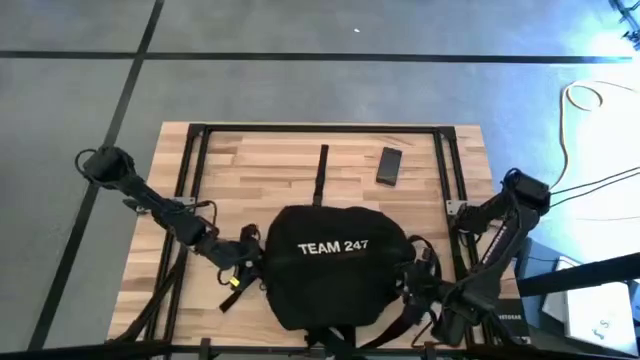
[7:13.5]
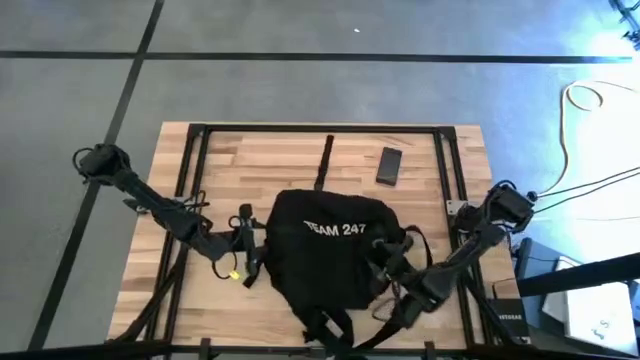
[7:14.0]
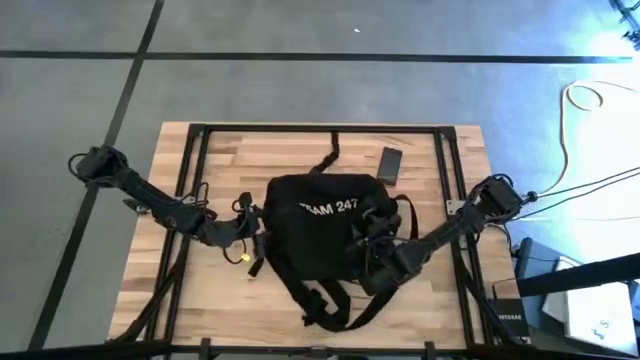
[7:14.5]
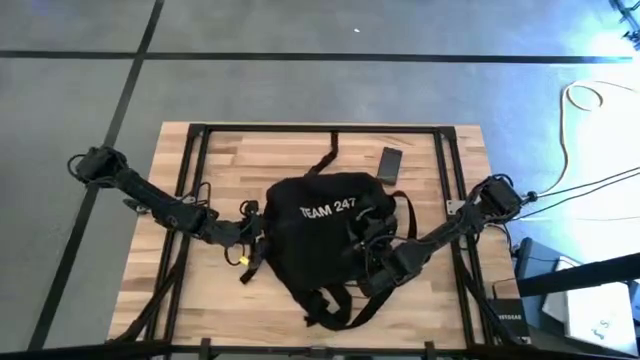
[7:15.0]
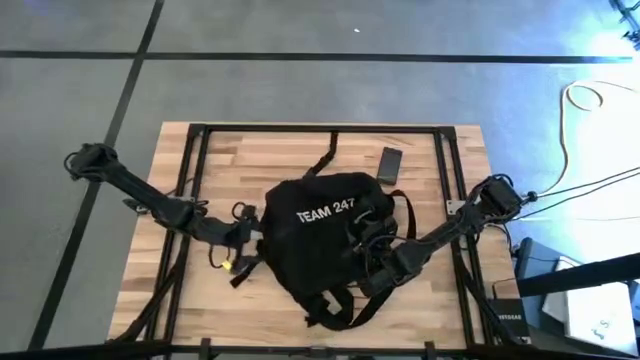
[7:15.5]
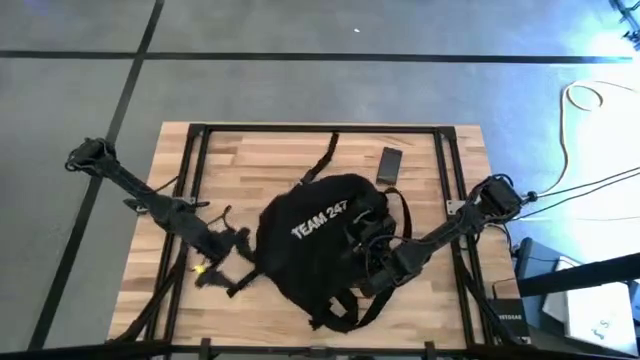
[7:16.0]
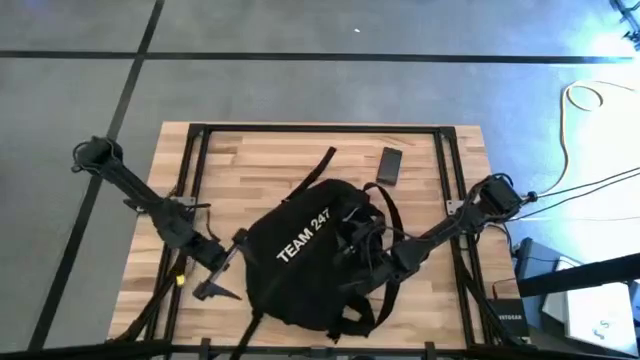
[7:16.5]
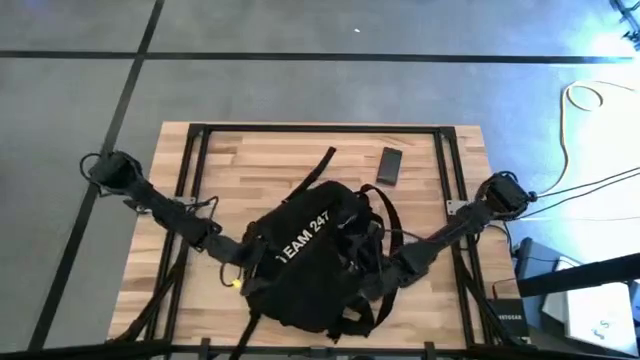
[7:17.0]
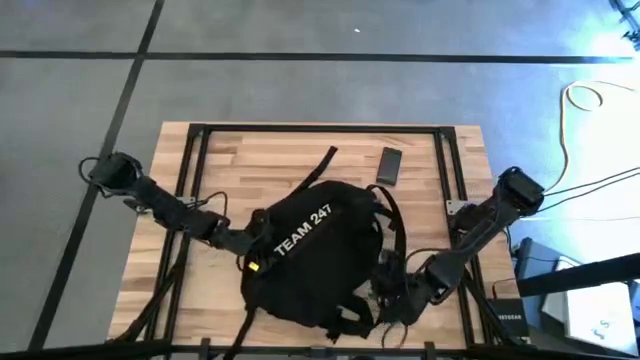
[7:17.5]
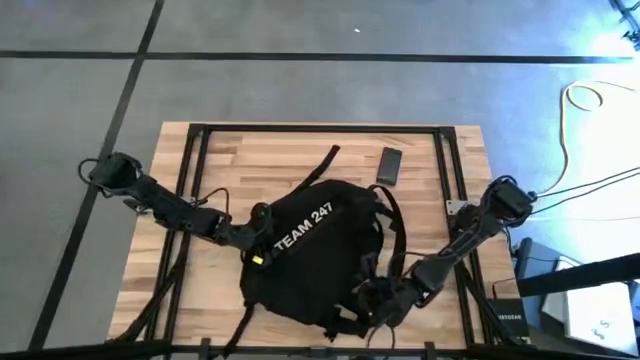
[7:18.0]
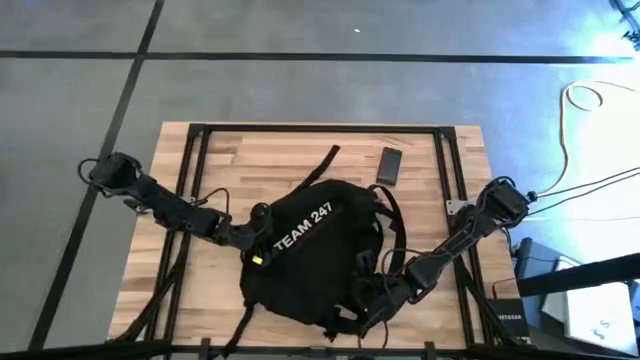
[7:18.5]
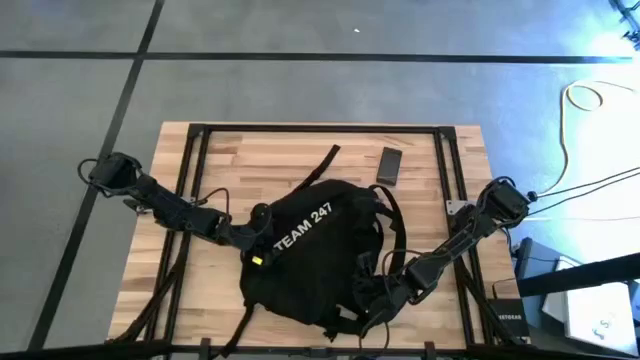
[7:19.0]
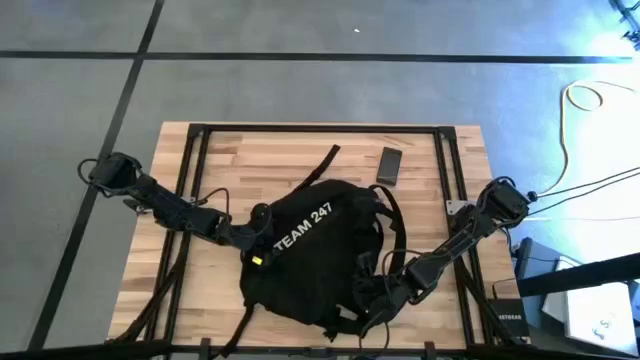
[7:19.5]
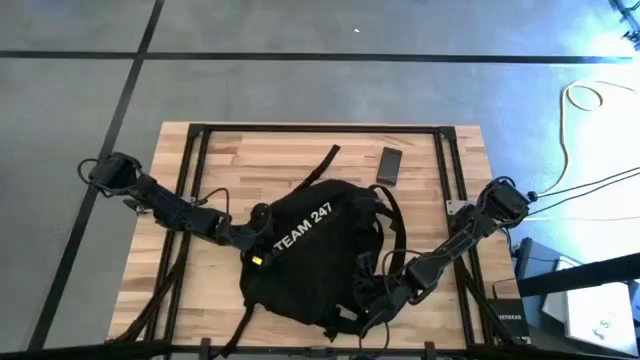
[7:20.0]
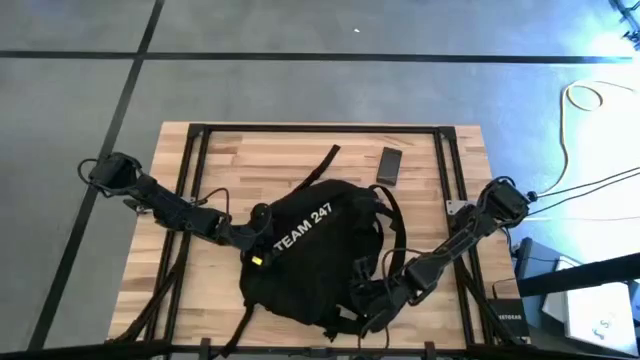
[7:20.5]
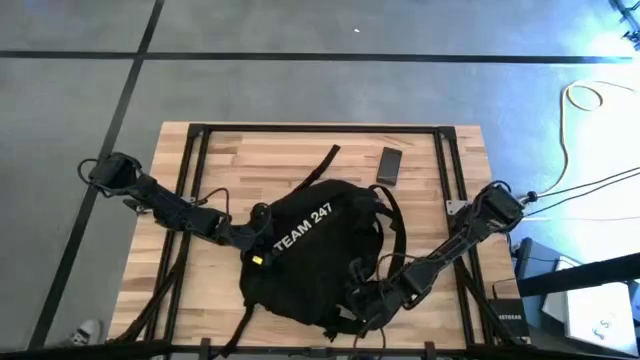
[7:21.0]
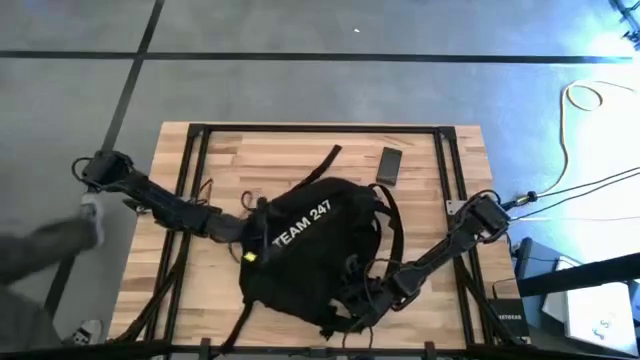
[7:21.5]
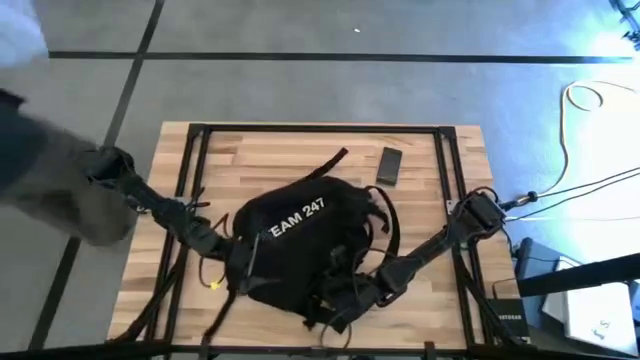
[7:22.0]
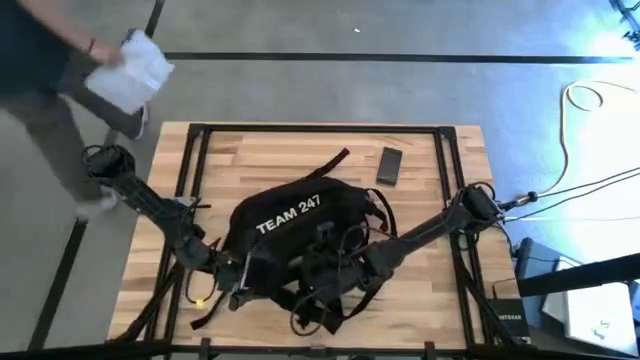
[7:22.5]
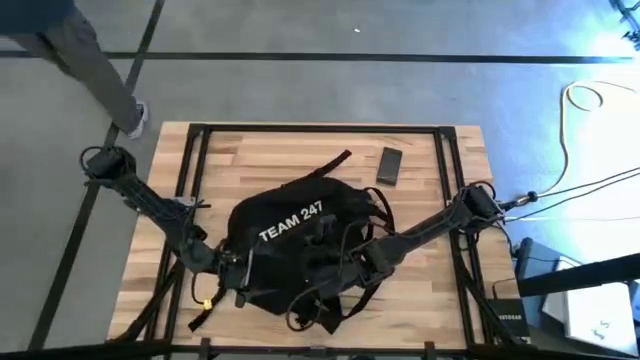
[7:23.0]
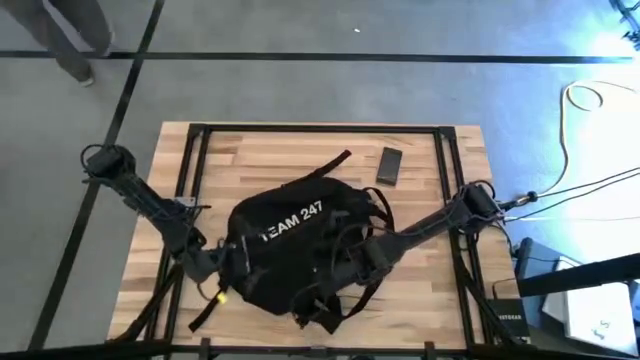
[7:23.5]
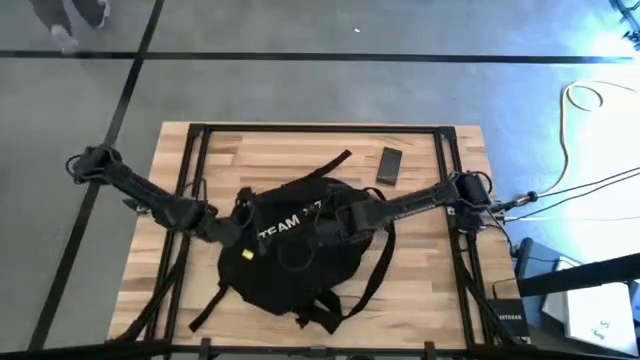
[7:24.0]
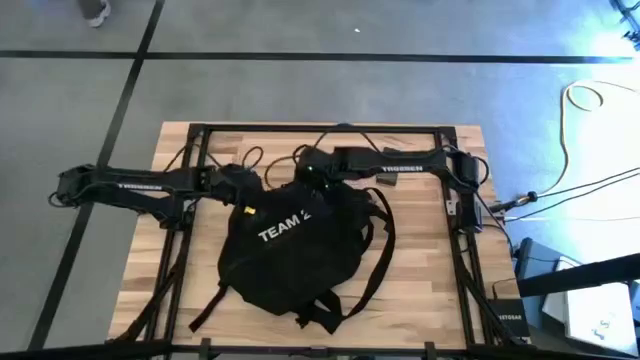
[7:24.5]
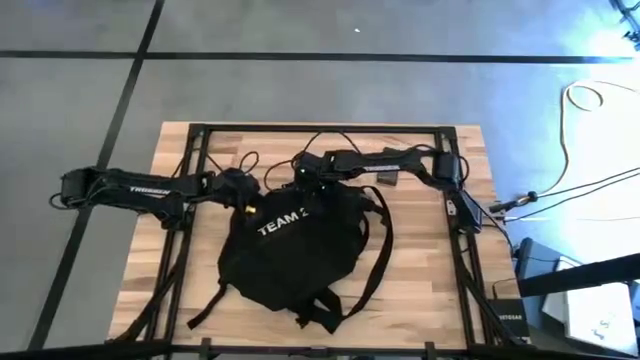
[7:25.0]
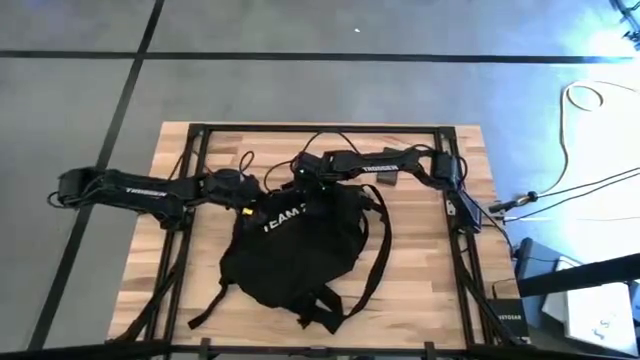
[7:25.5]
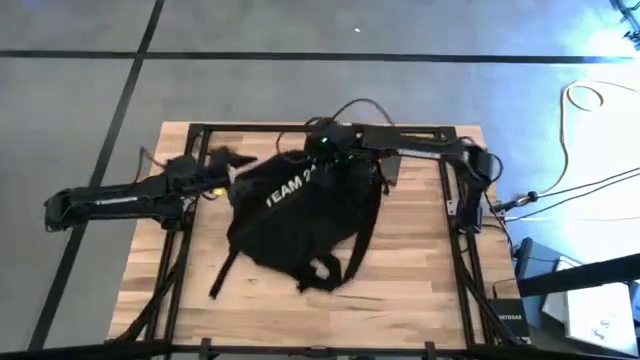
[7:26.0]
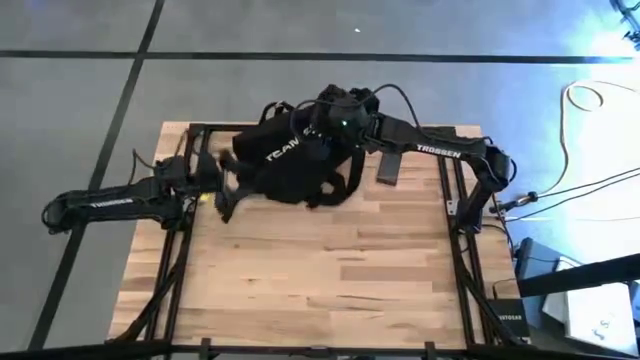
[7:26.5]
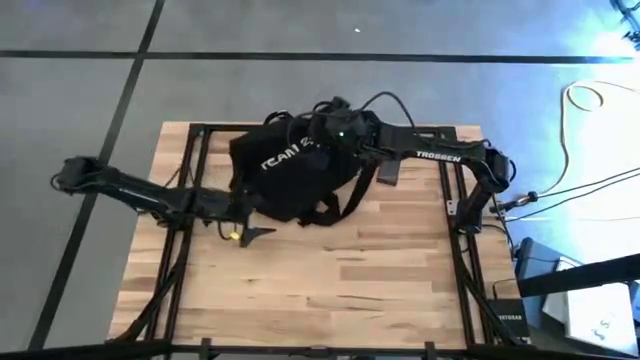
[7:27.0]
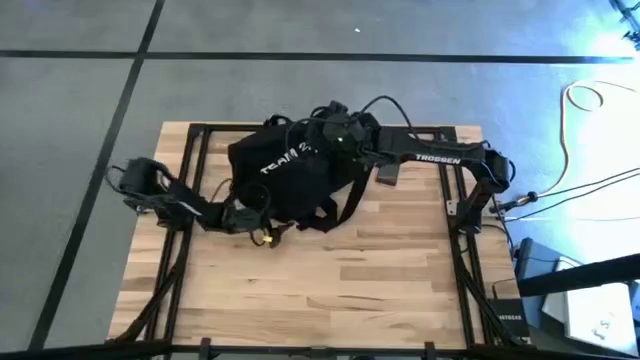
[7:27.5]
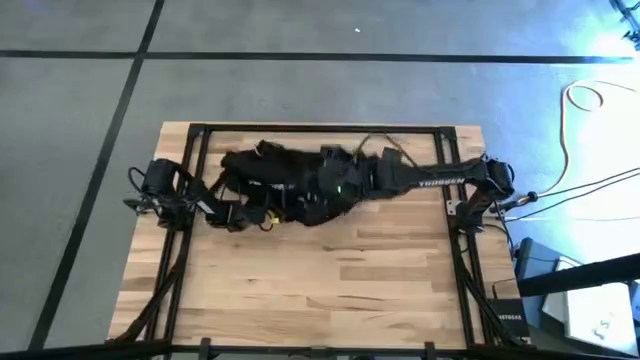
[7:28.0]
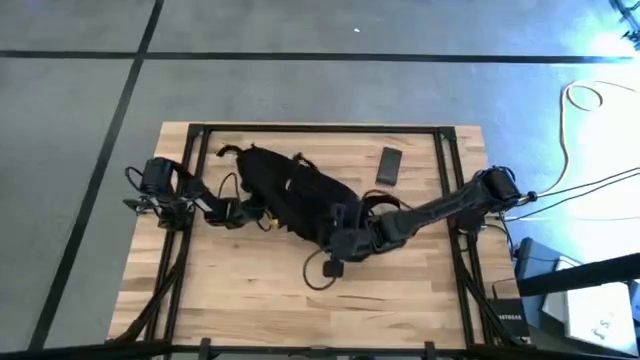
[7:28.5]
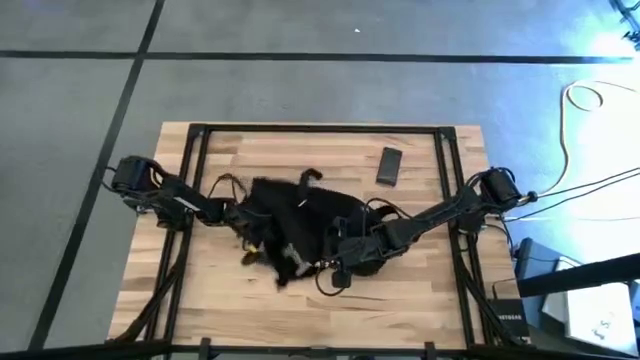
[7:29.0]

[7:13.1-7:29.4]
Task: Unpack backpack
Adjust the black bag
